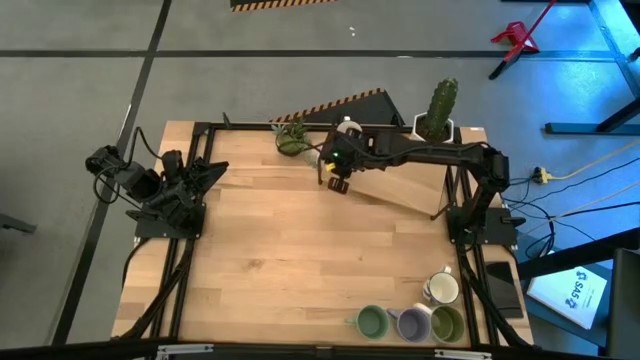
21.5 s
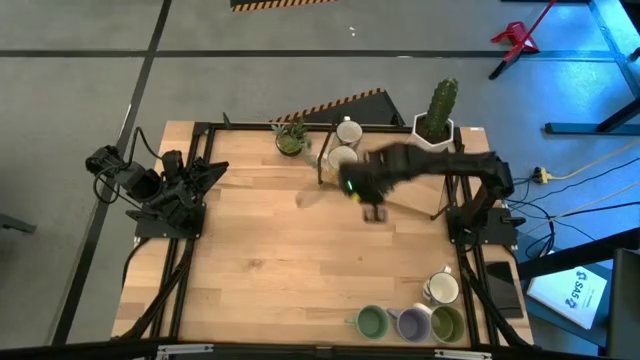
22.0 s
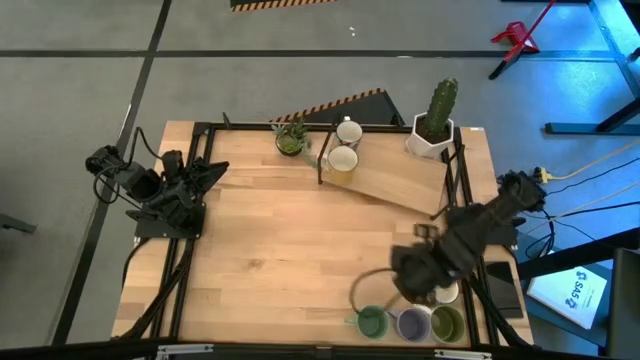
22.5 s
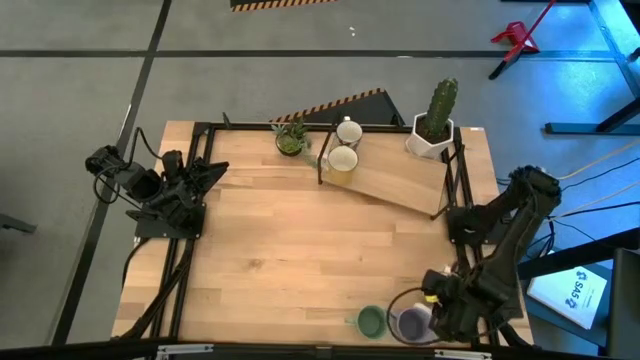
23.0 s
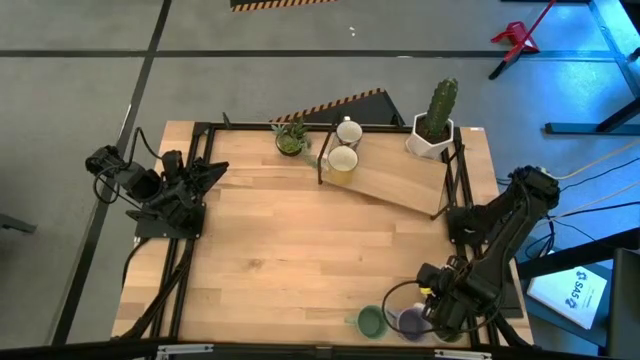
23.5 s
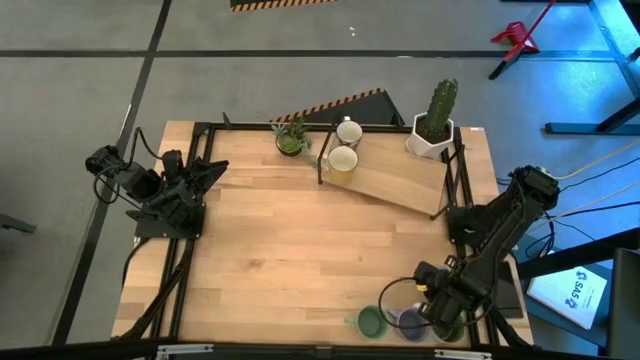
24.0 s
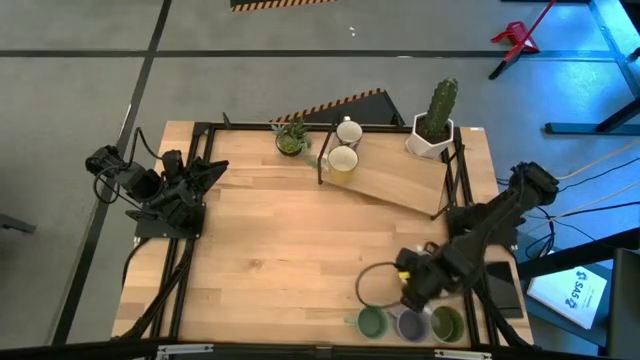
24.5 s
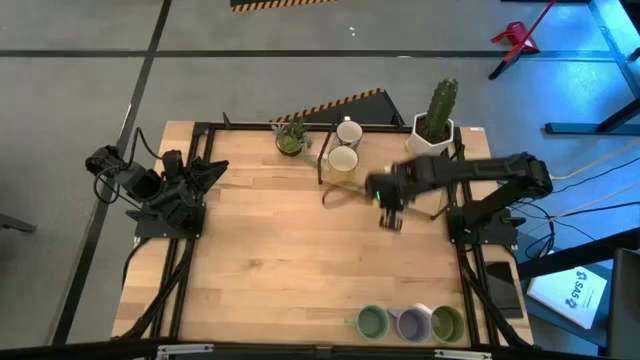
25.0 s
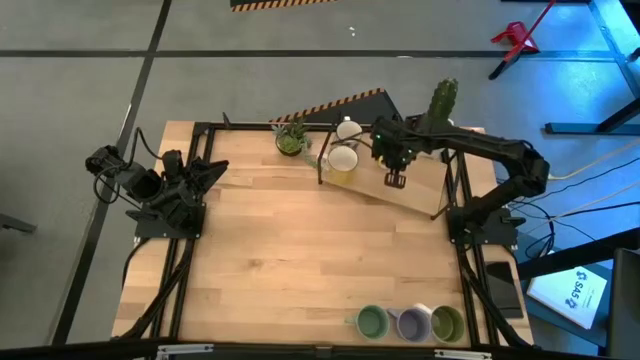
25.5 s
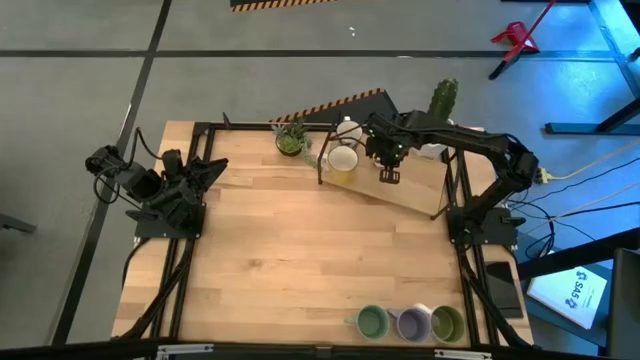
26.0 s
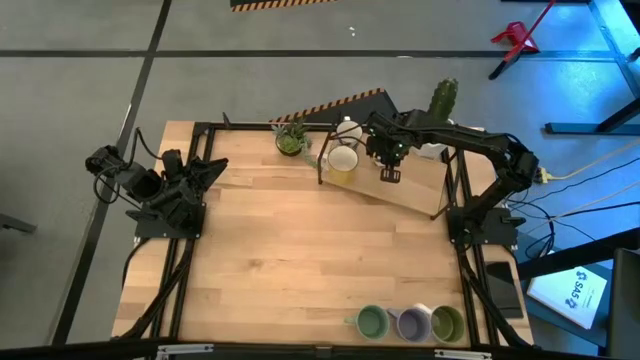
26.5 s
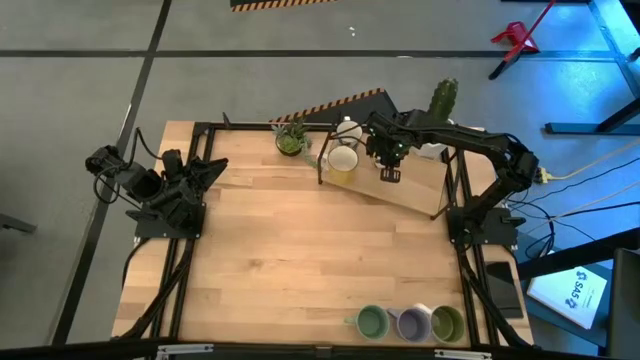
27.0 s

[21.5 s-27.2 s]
Task: Place coffee mugs
Put the blue patterned mug on the shelf

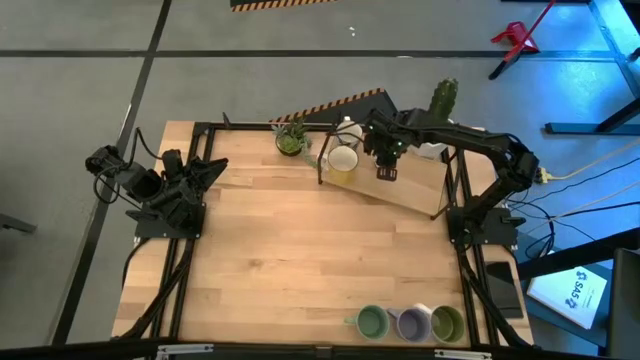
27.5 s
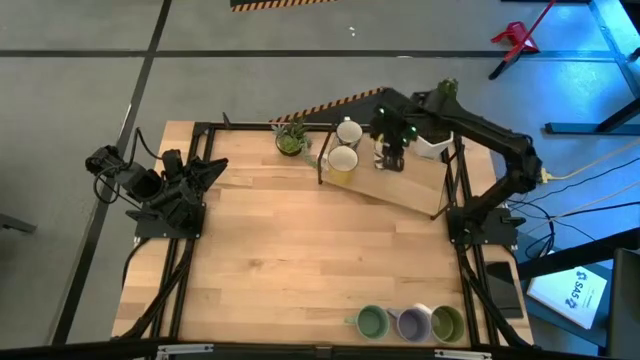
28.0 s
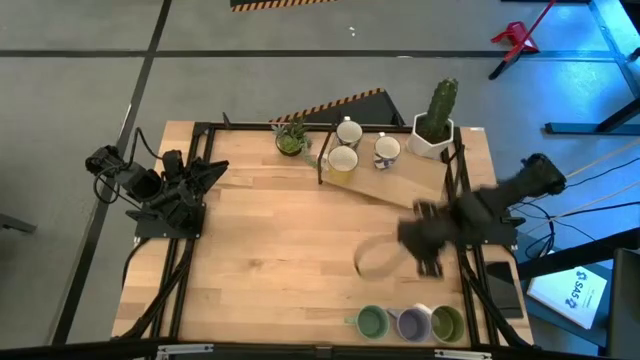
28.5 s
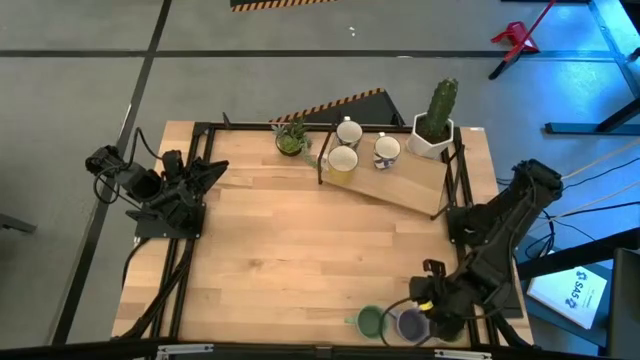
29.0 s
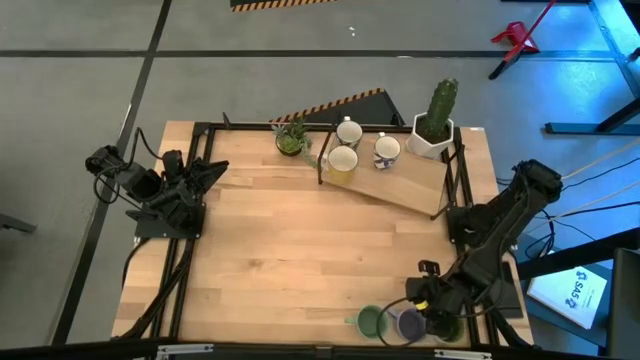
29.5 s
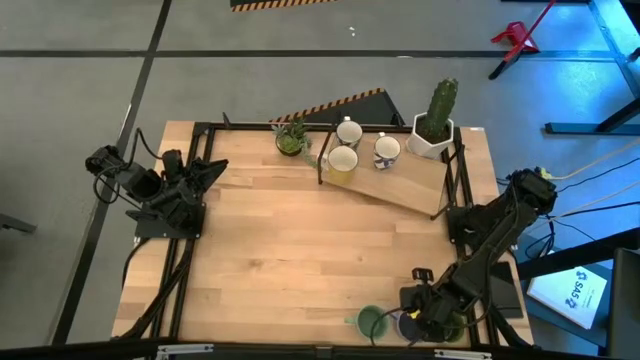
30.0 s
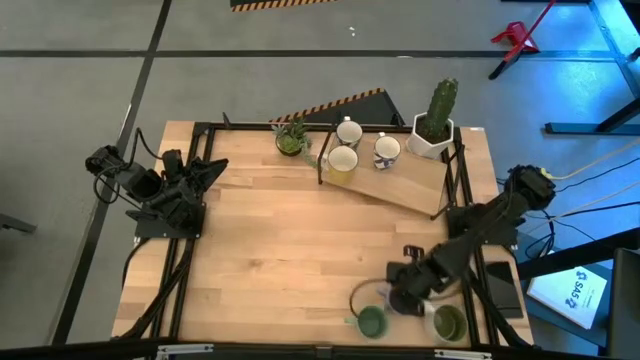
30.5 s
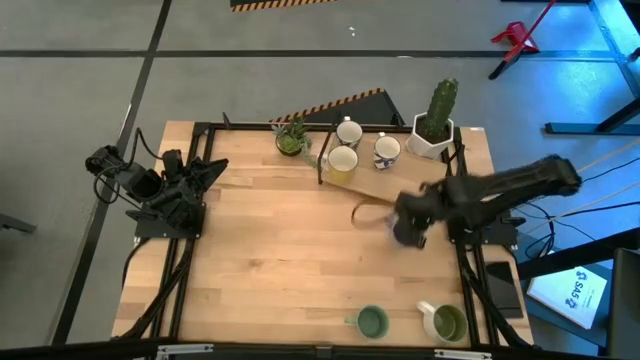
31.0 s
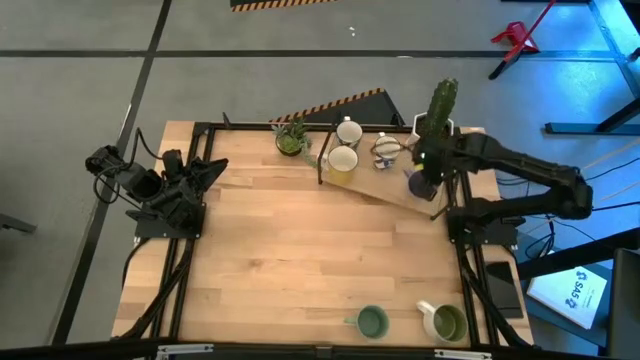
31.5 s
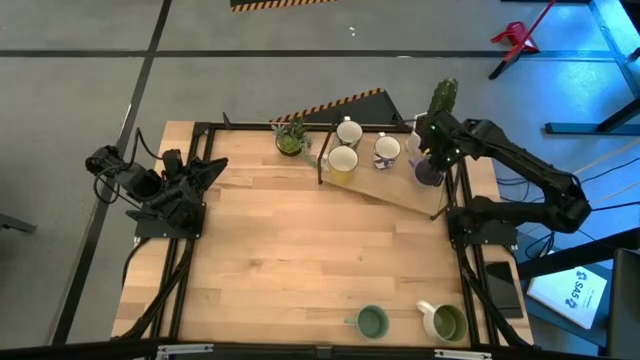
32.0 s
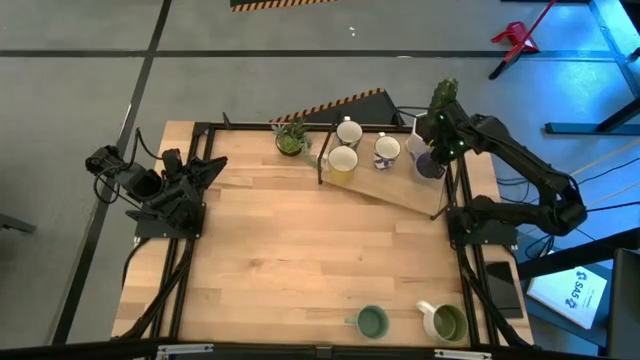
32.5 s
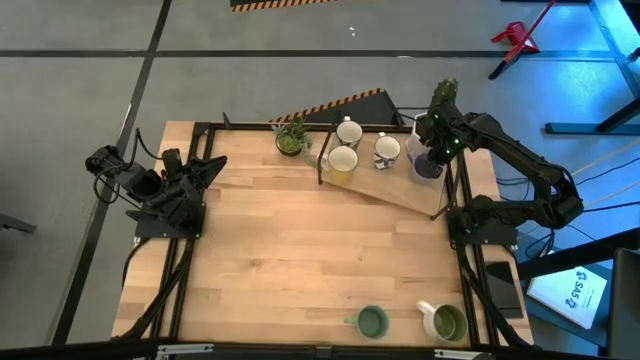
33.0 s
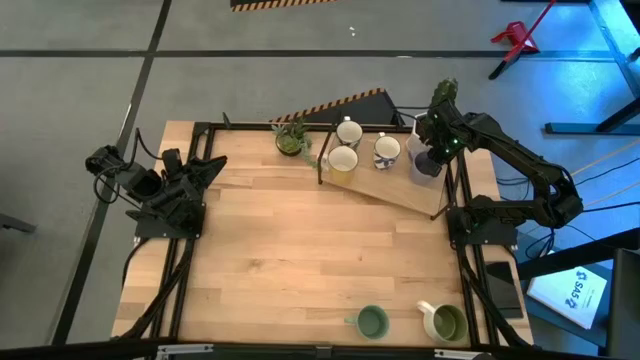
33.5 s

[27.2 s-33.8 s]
Put the violet mug on the shelf

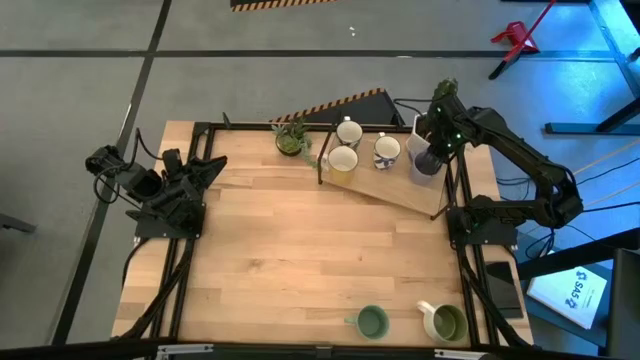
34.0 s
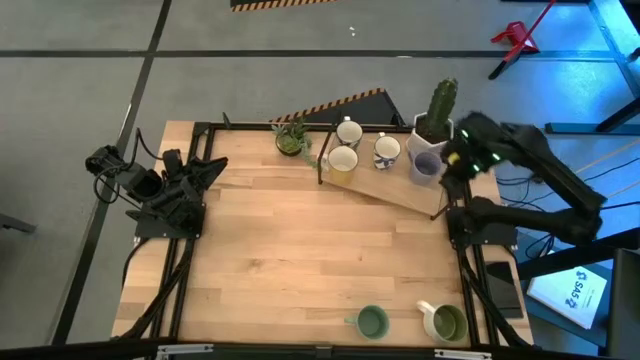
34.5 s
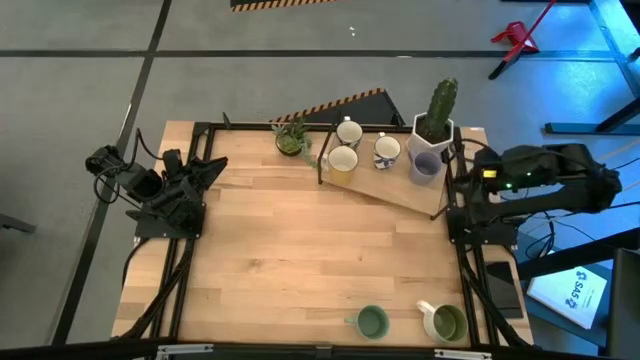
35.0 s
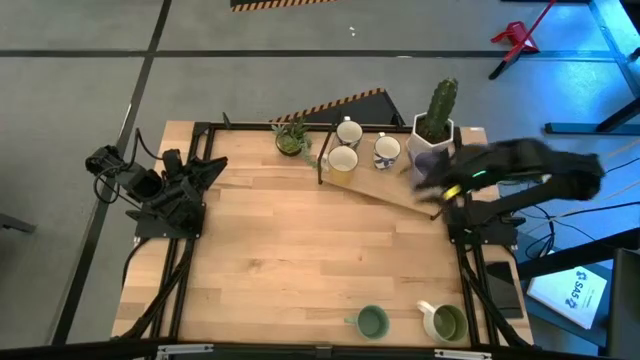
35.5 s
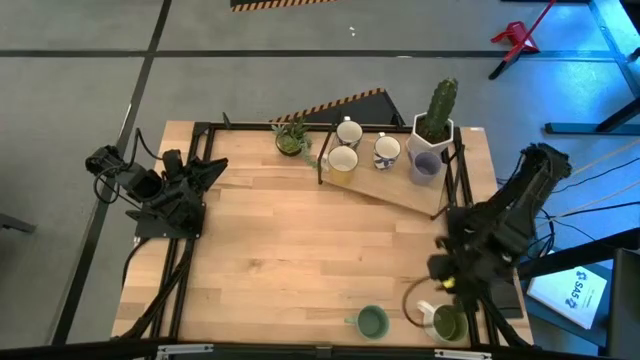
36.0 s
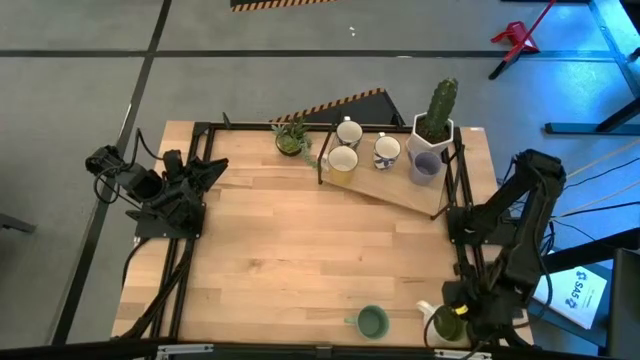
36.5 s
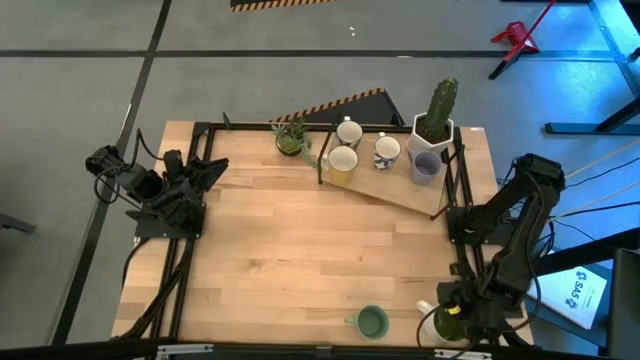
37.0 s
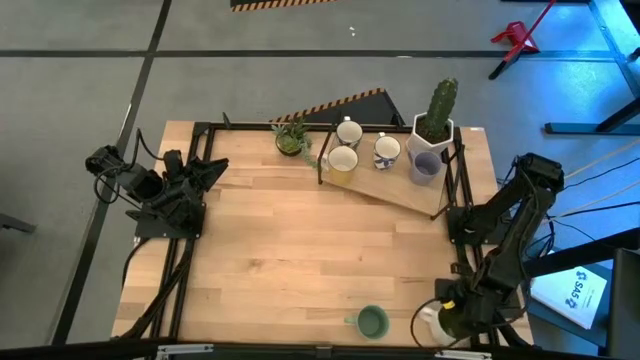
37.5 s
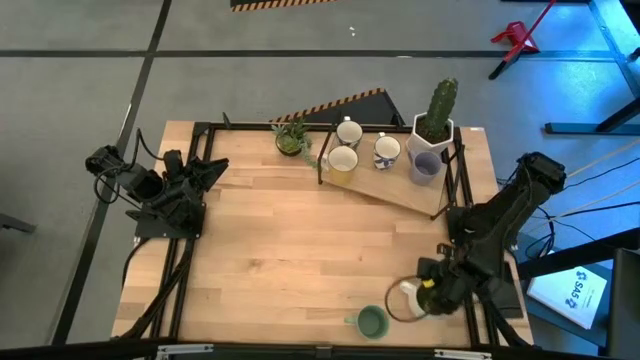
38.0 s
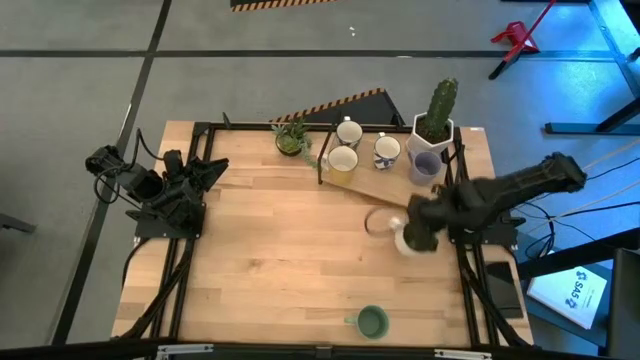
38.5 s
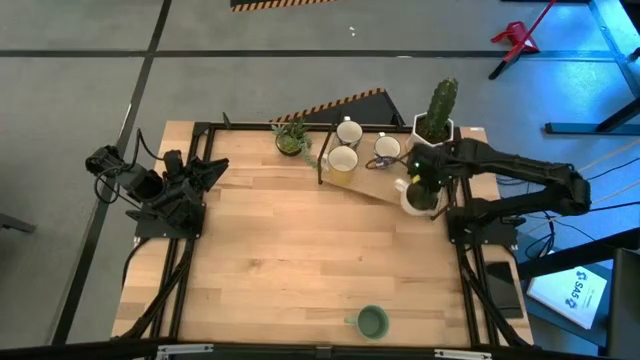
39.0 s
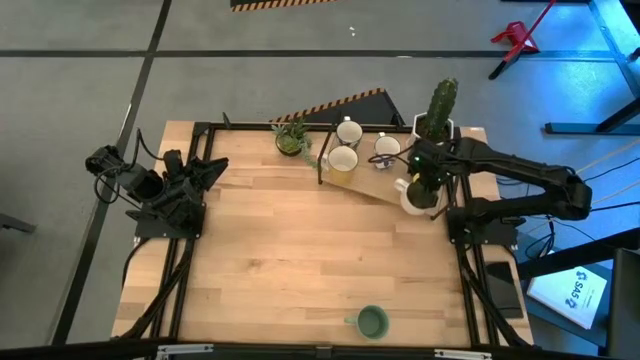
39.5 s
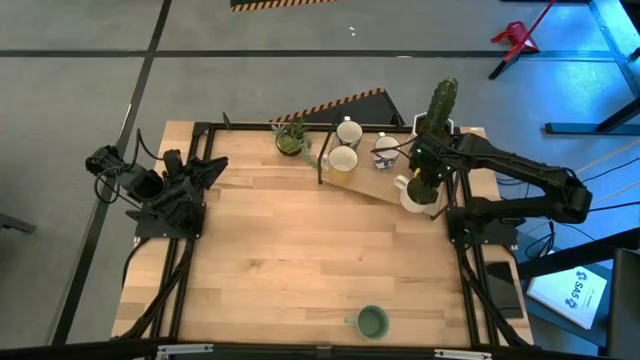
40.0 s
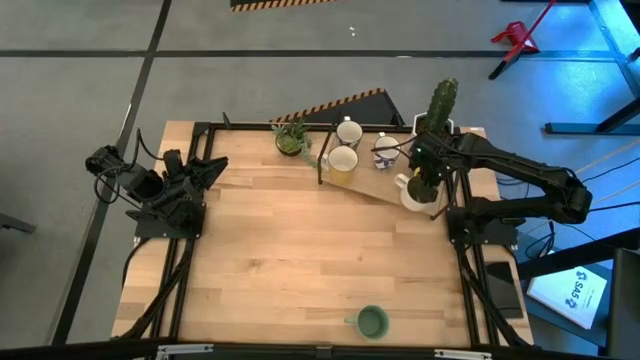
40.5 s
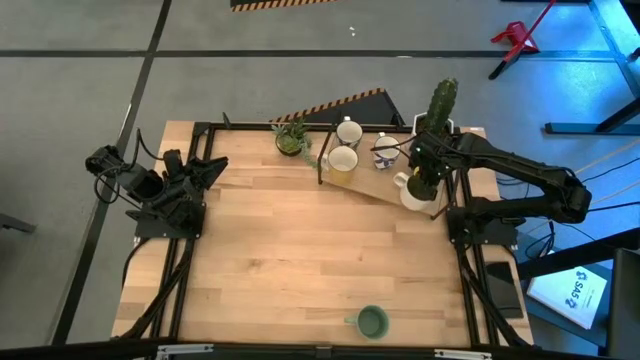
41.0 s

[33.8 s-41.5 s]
Put the white mug on the shelf
